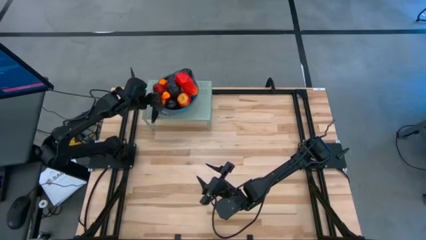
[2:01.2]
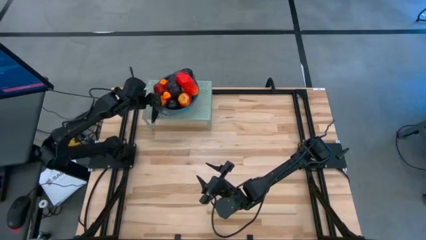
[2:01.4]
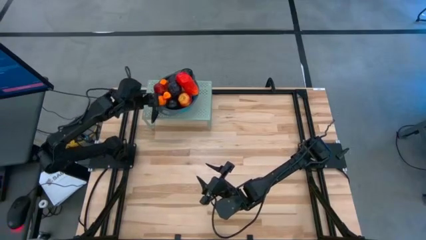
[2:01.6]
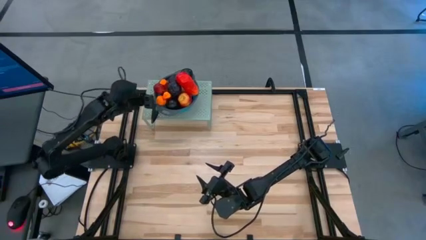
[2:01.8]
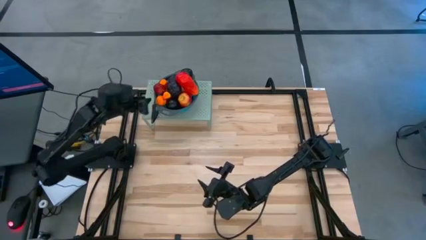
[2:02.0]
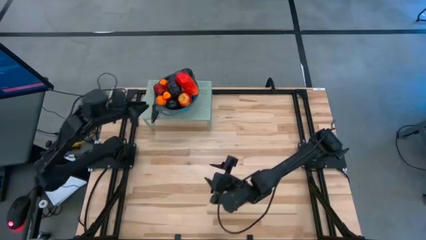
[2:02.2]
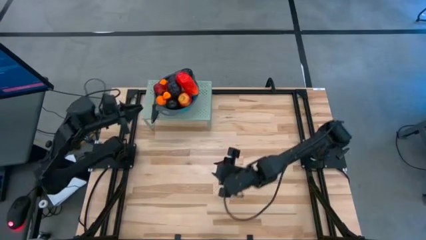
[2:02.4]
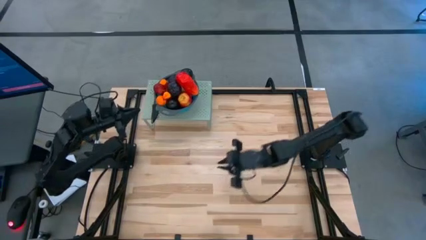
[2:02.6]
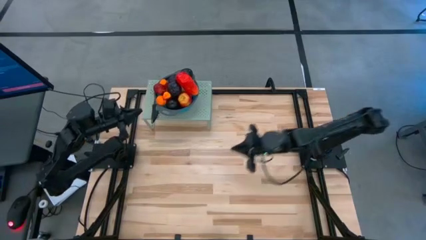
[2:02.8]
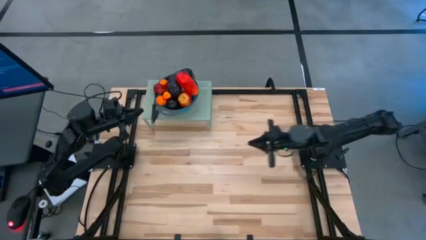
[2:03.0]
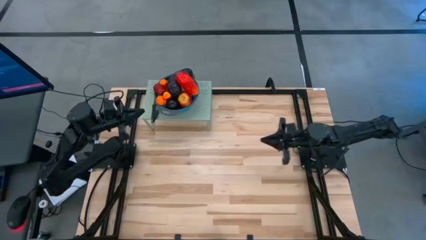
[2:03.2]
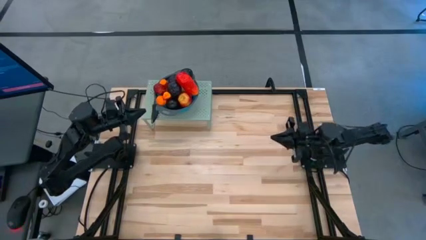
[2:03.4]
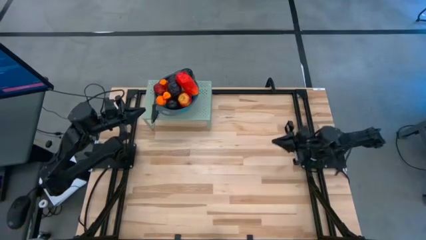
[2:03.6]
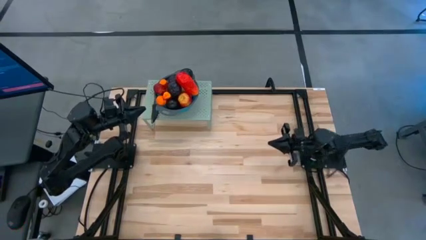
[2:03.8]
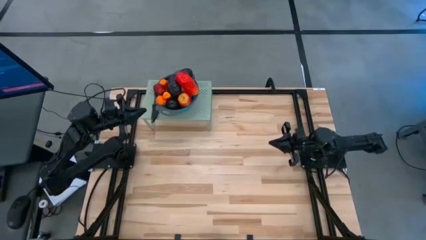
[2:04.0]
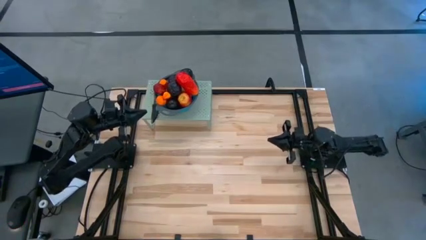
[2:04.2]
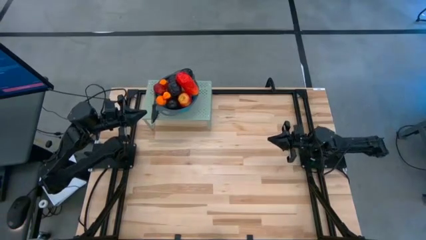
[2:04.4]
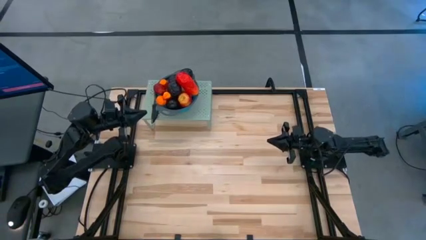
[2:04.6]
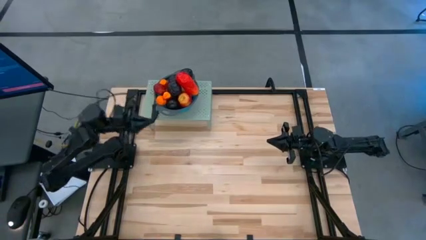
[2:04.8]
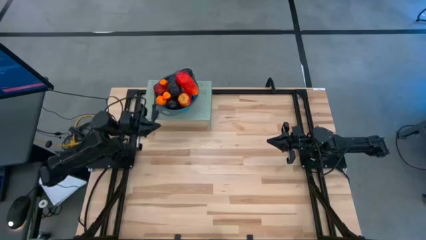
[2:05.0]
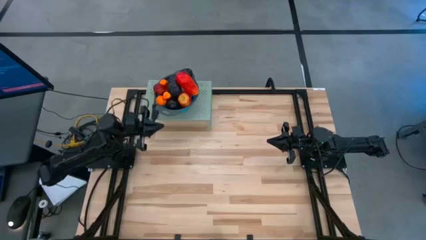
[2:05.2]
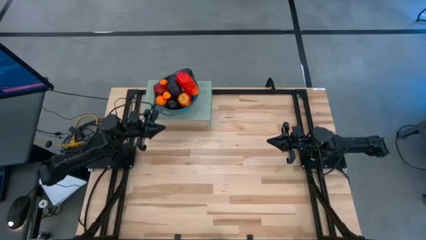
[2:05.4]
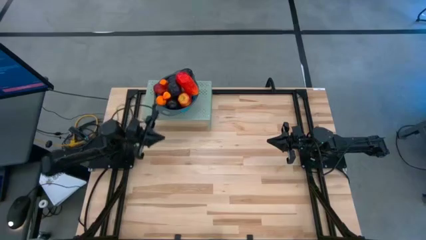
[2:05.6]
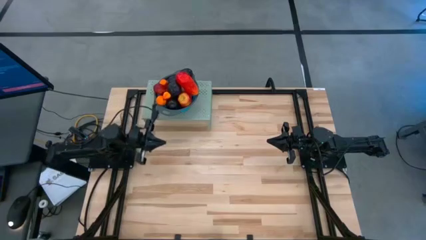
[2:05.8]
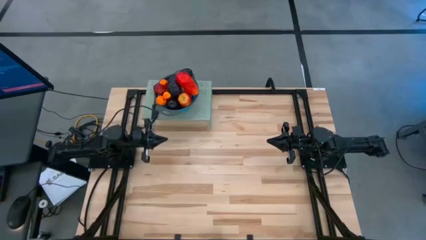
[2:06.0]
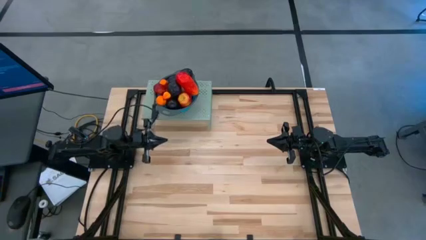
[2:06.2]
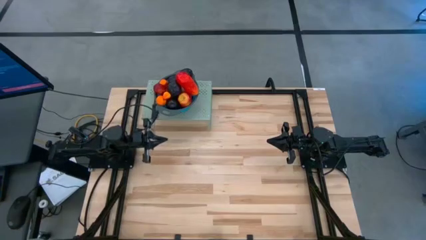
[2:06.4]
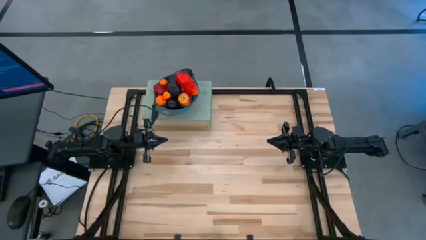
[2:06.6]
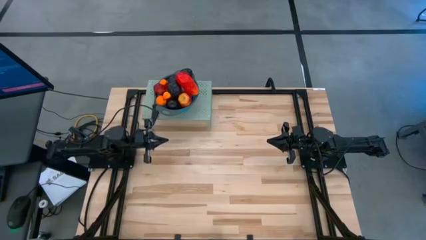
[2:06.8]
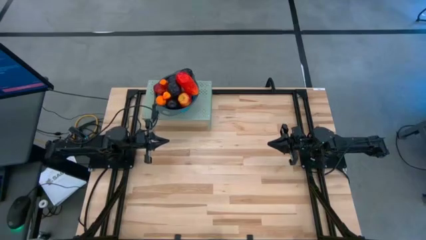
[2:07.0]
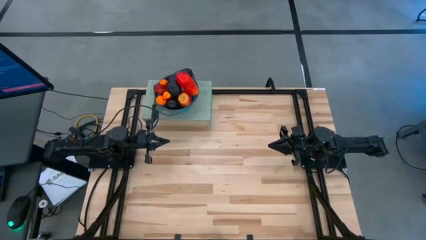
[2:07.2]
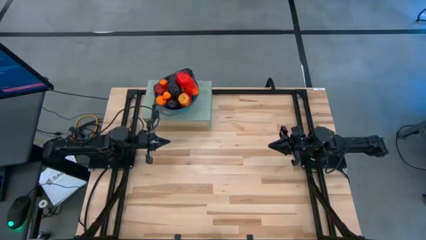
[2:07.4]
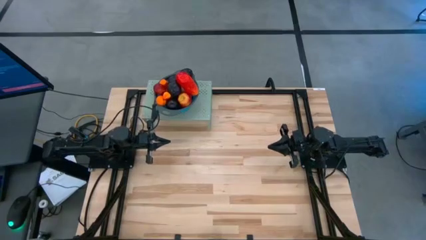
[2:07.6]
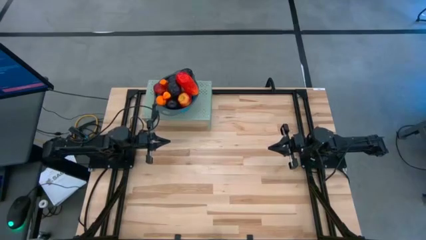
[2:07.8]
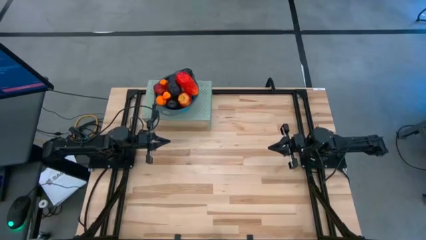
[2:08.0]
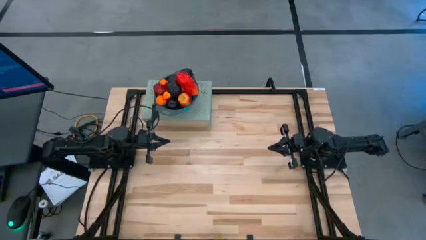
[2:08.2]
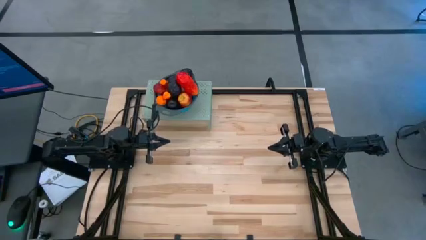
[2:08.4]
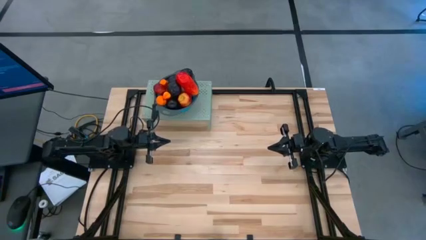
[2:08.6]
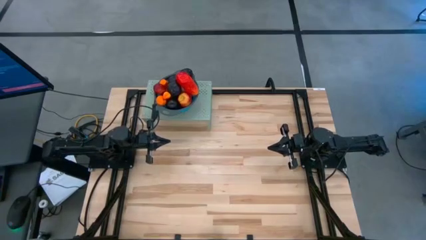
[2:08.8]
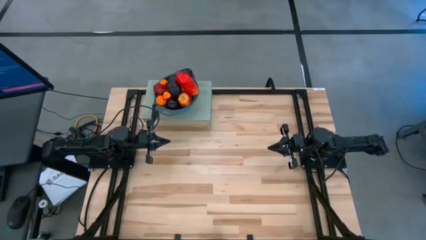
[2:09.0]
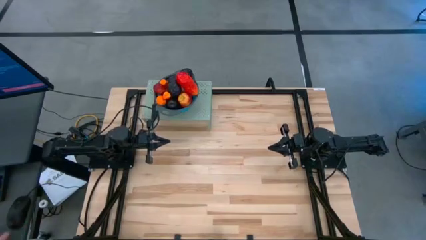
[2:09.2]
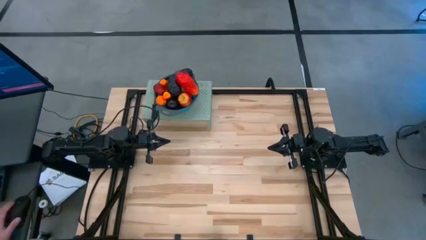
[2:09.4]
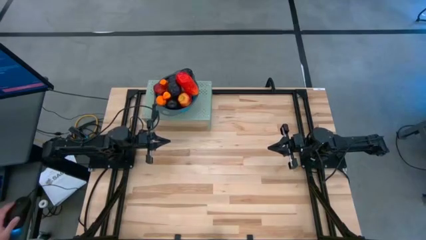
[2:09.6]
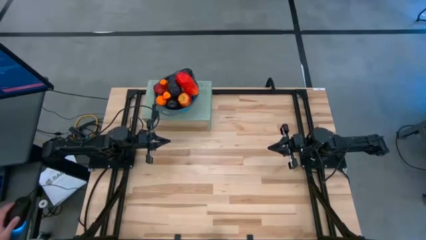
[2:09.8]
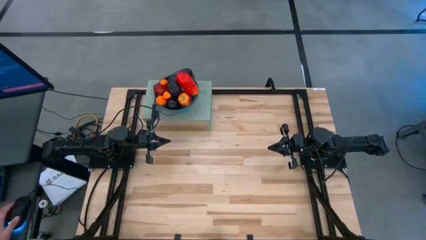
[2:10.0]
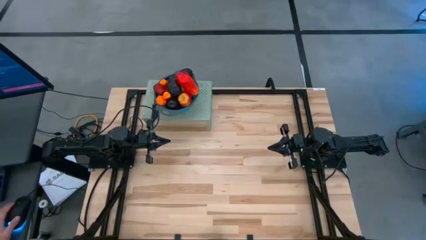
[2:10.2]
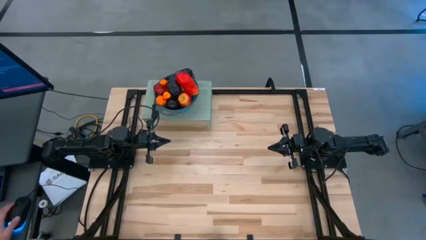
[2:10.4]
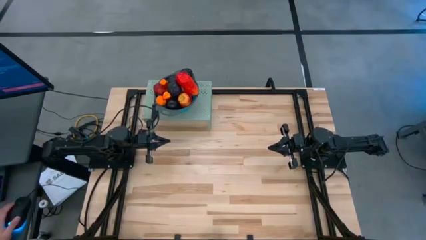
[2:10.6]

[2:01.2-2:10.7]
Task: Pick & Place Fruit
Return to Home Position

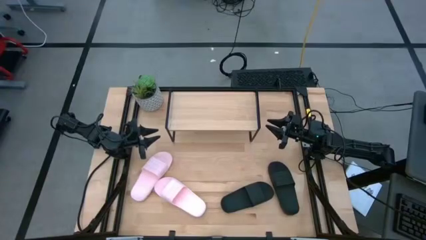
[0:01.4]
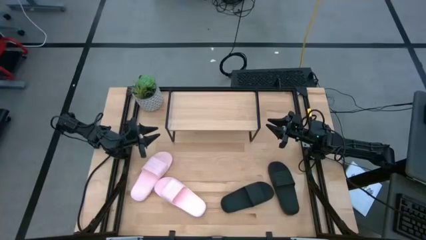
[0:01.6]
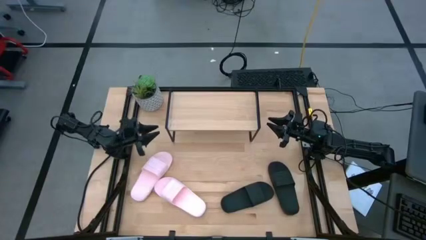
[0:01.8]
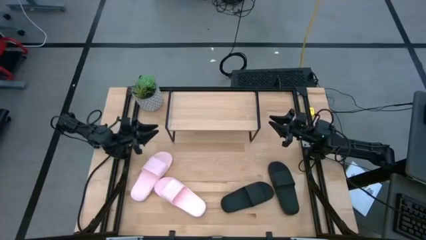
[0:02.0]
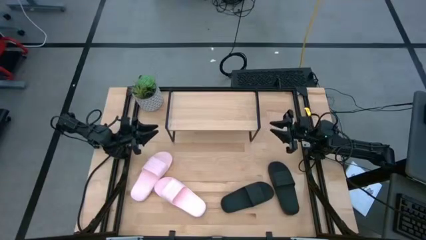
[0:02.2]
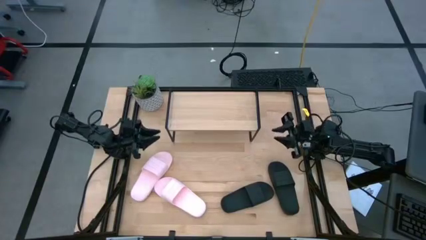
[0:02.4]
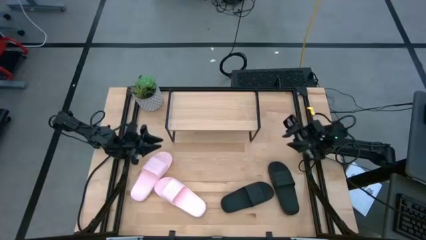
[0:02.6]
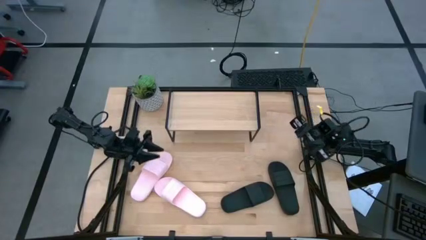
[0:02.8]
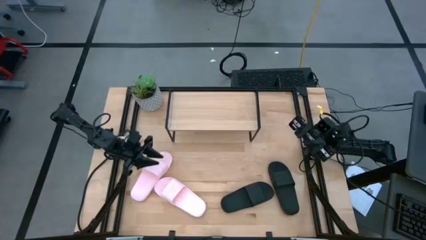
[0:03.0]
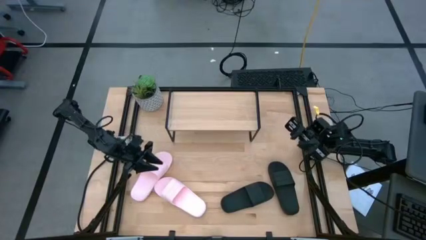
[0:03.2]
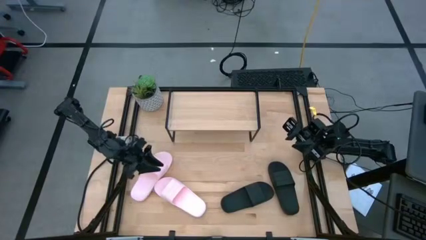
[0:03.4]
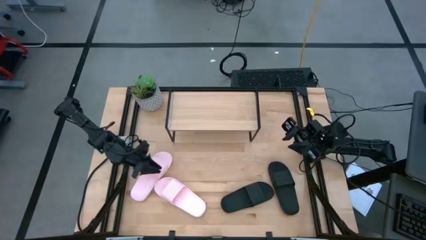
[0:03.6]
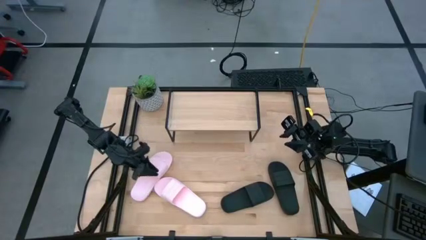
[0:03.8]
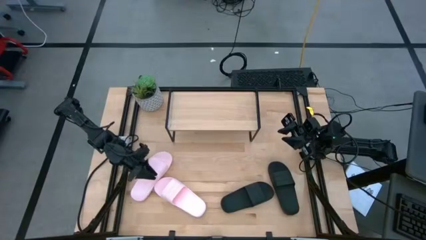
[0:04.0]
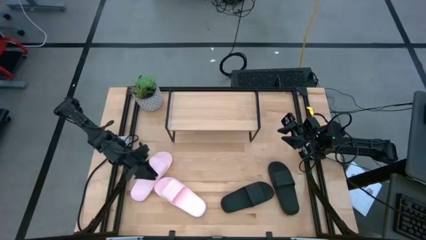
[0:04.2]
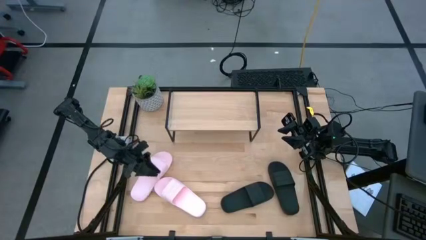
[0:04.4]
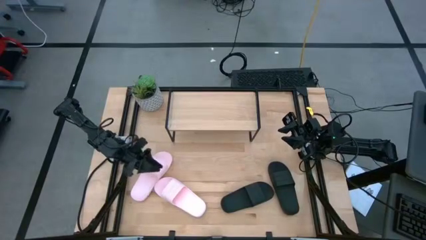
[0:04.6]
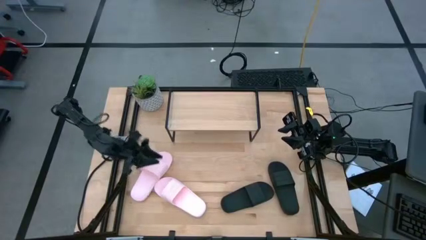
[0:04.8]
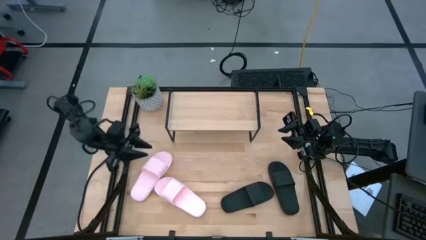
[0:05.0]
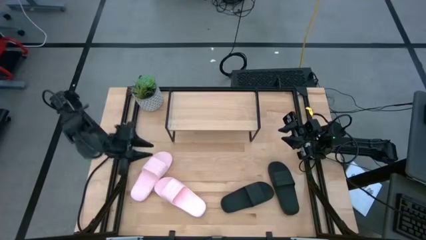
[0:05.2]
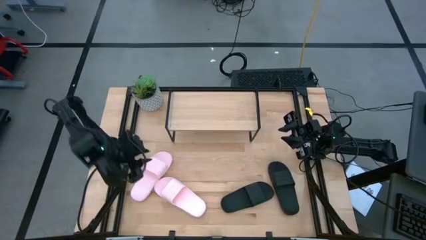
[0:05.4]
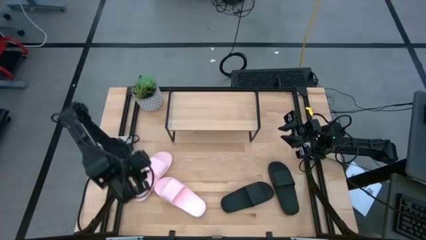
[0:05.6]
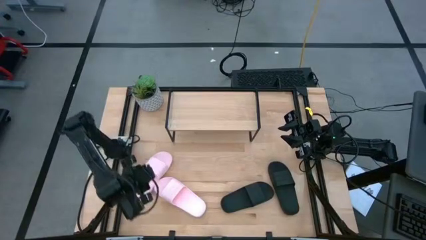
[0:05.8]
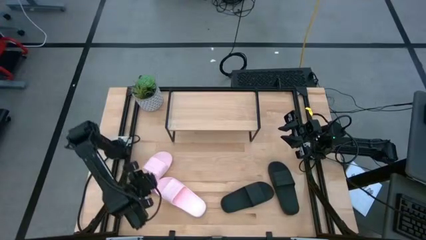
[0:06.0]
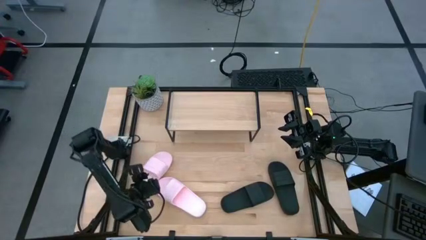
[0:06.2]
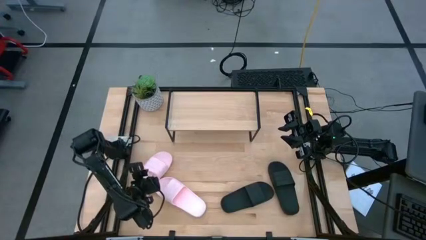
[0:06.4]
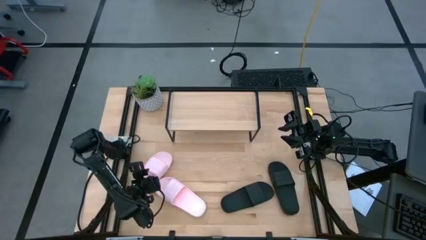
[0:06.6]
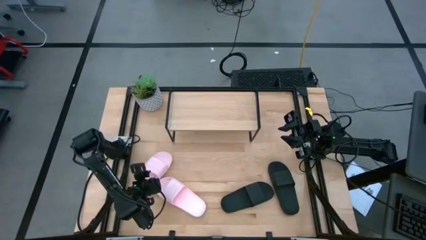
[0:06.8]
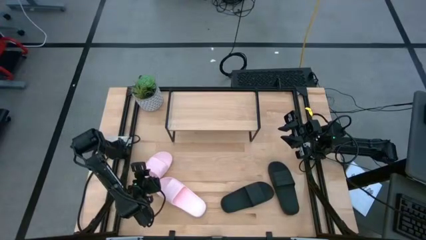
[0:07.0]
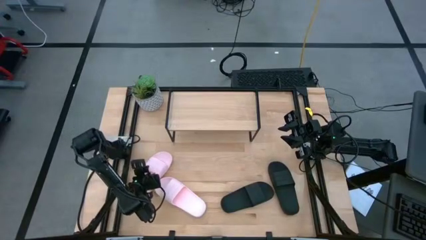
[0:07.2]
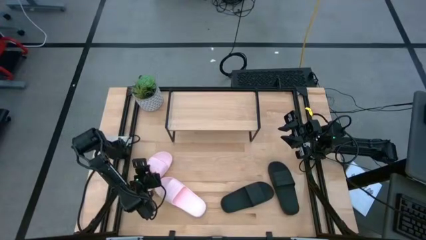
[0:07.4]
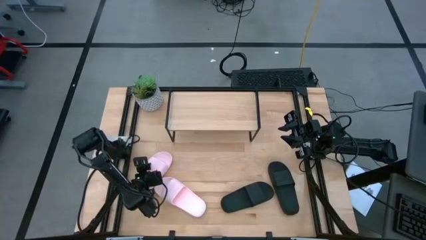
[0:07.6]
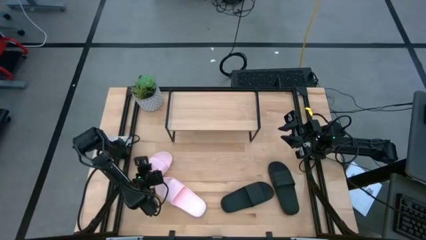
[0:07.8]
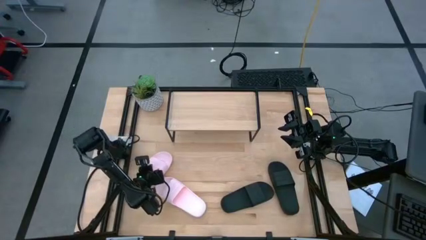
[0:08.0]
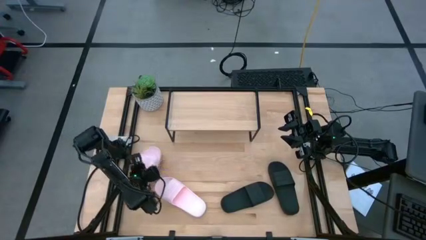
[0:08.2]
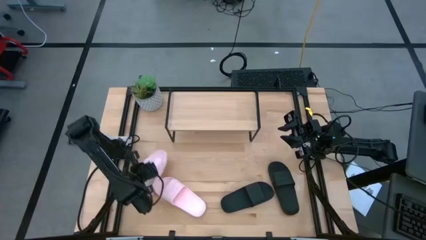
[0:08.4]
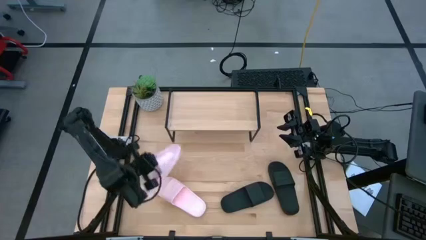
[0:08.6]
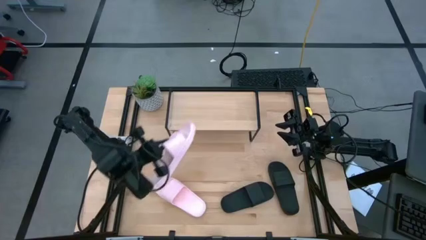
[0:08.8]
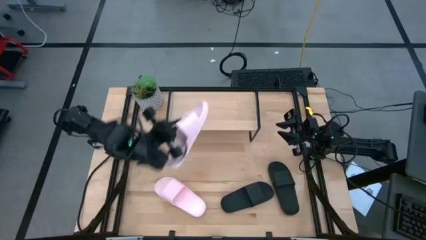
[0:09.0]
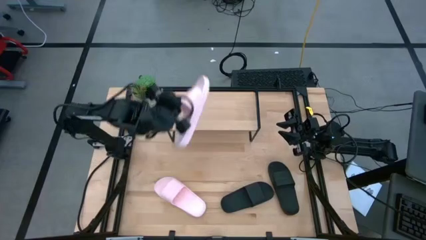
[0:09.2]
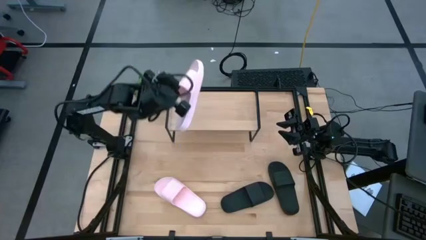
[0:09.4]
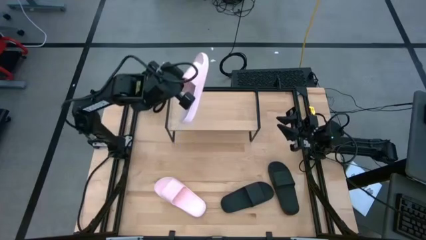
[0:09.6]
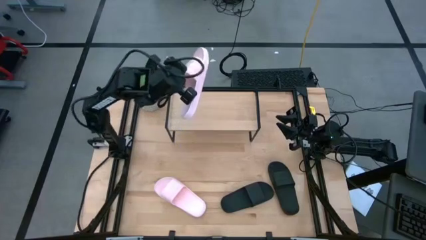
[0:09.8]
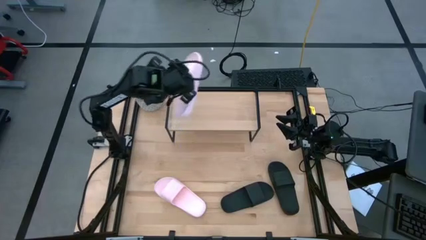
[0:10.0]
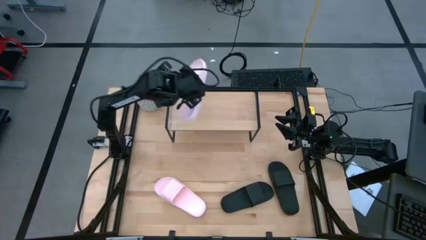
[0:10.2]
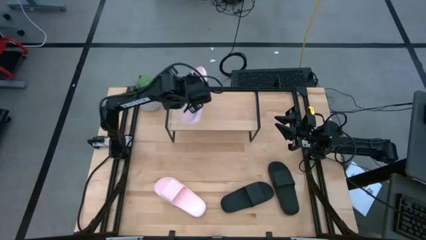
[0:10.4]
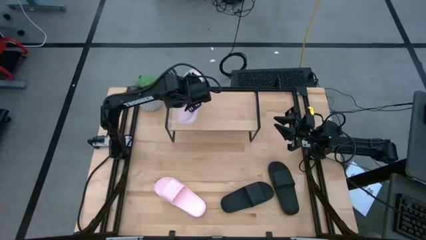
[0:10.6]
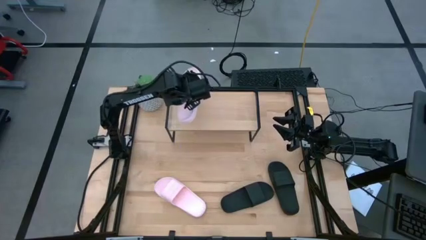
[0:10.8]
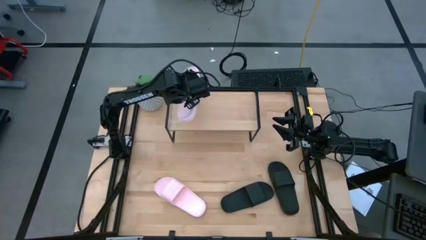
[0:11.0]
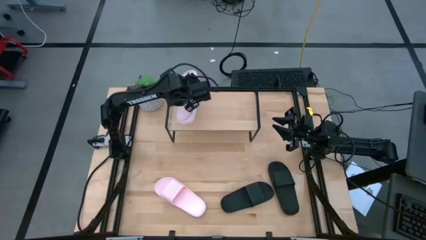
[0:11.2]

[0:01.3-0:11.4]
Task: Pick and place slides into the shelf
Put the left pink slipper on the shelf
